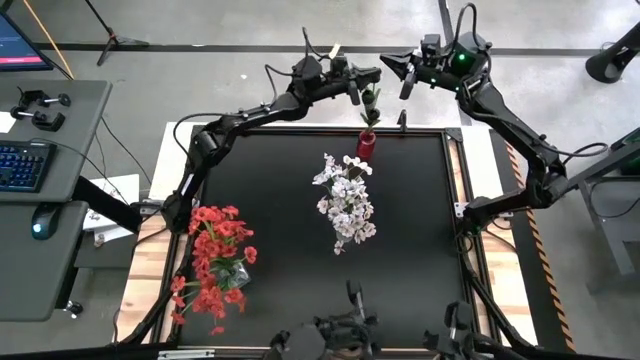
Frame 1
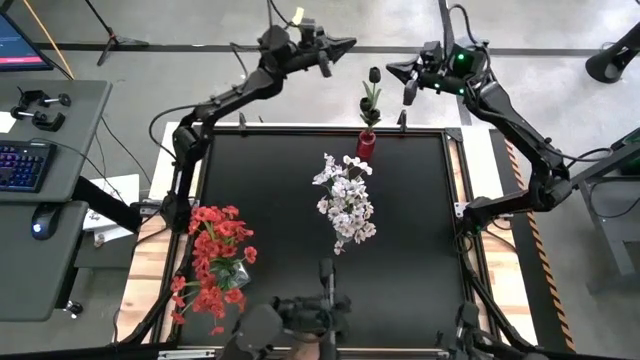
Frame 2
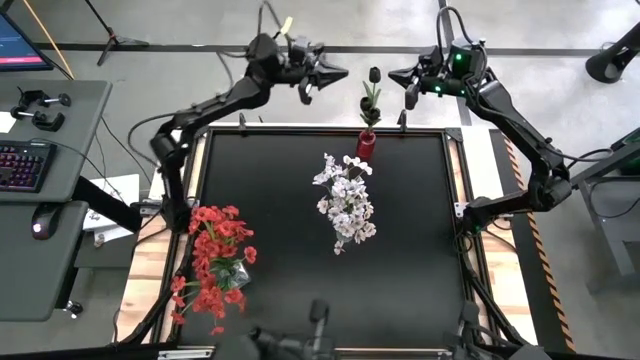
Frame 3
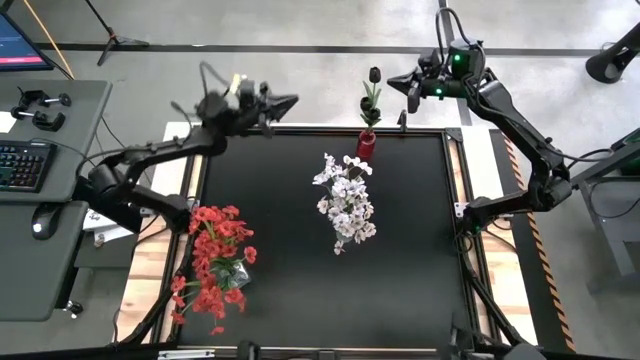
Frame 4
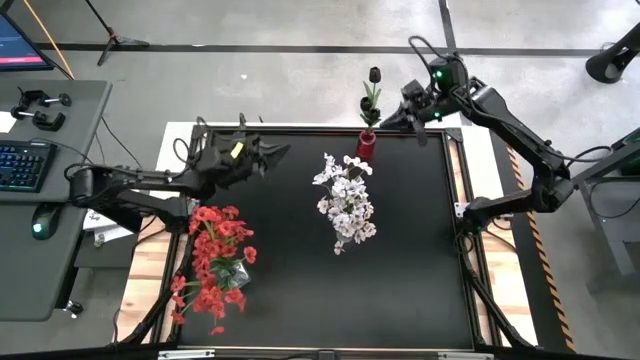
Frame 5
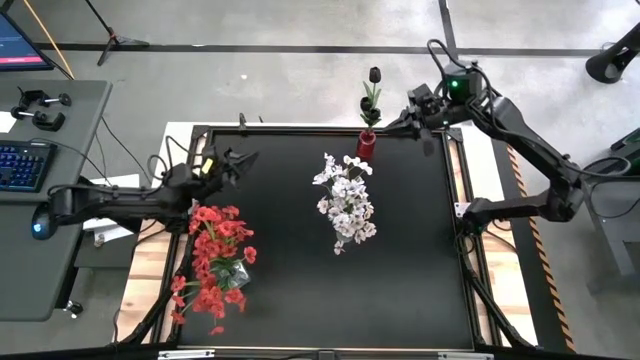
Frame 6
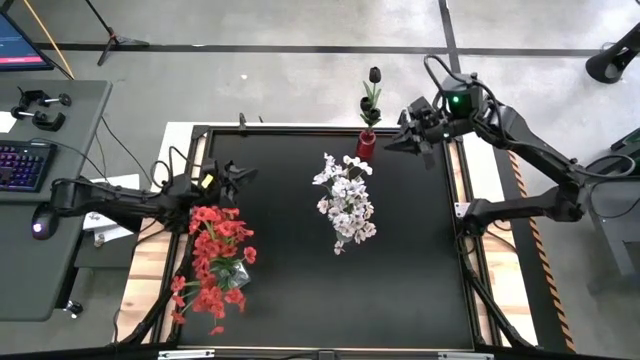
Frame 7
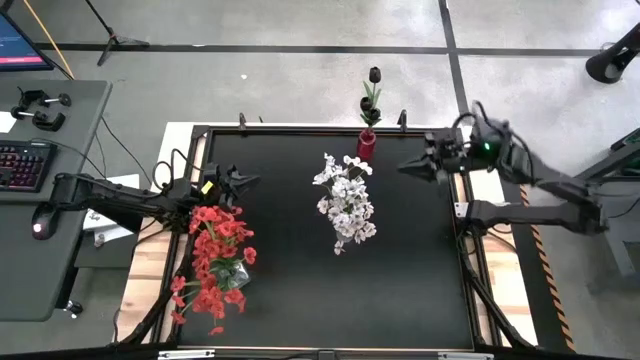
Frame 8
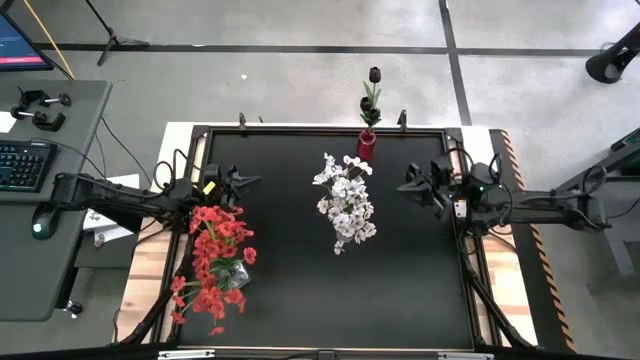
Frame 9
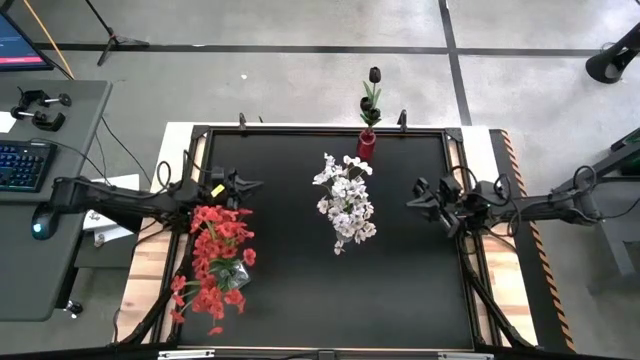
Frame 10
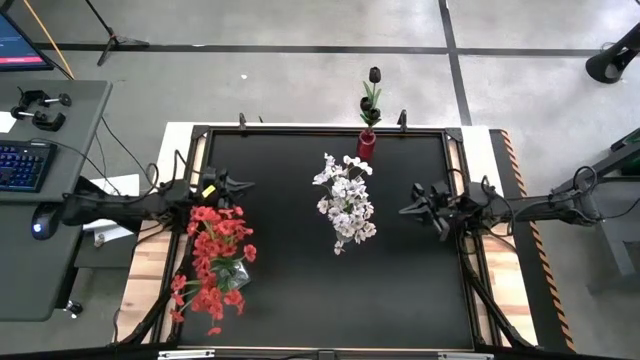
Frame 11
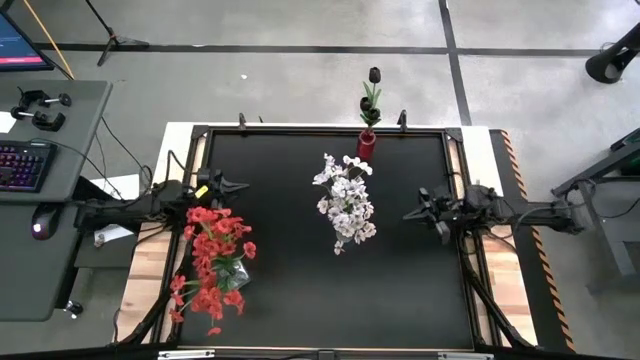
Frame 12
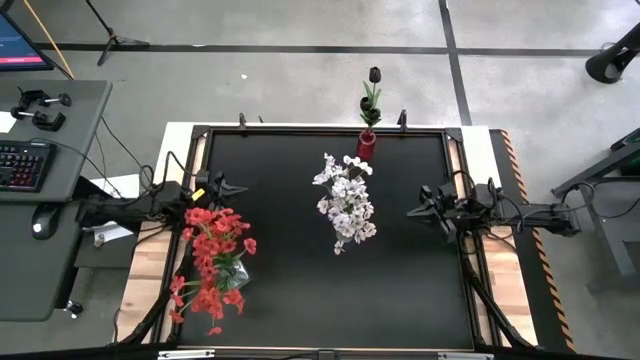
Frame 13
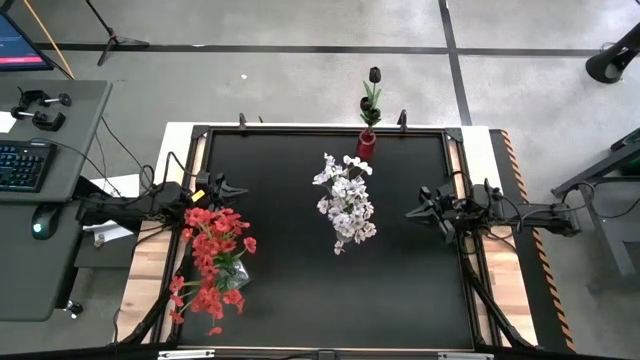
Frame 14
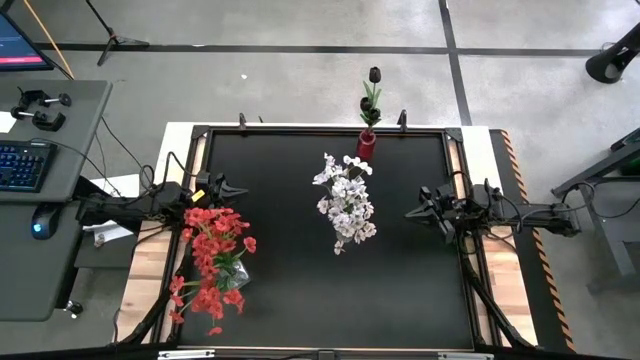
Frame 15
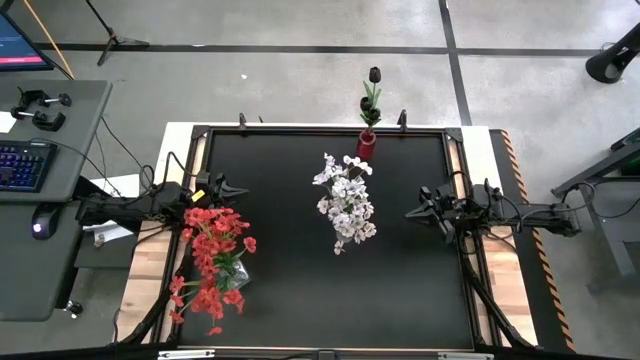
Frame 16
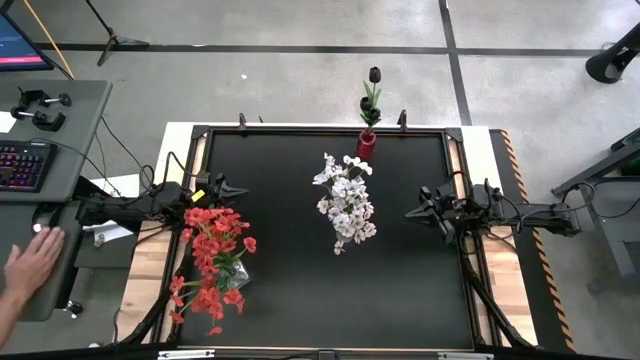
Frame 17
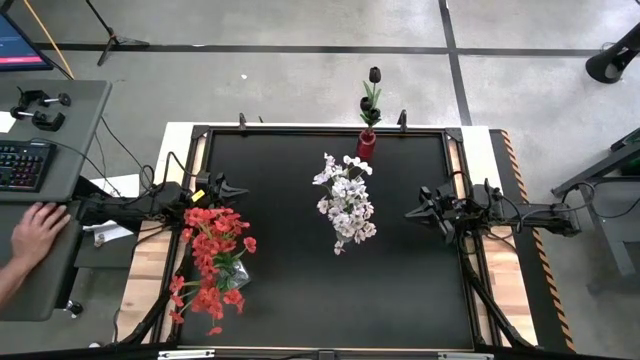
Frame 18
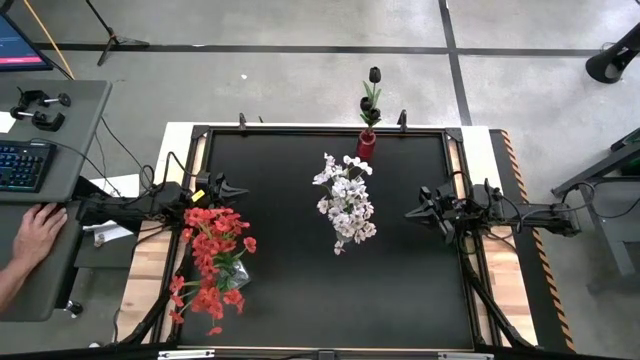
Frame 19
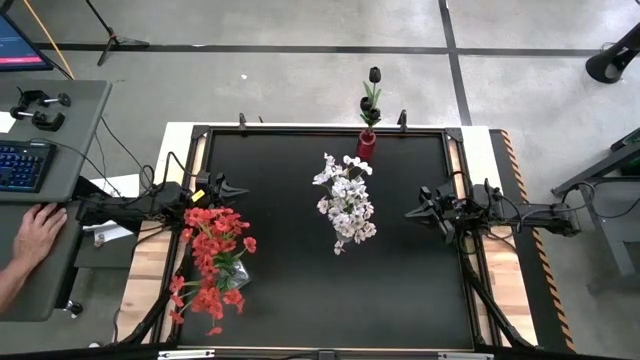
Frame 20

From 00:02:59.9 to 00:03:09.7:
Task: Sort flowers into vase by color
Return to Home Position

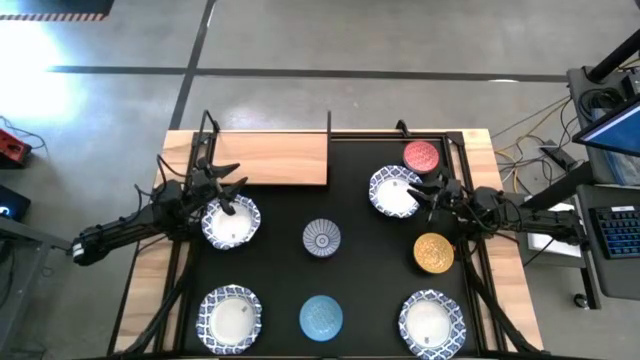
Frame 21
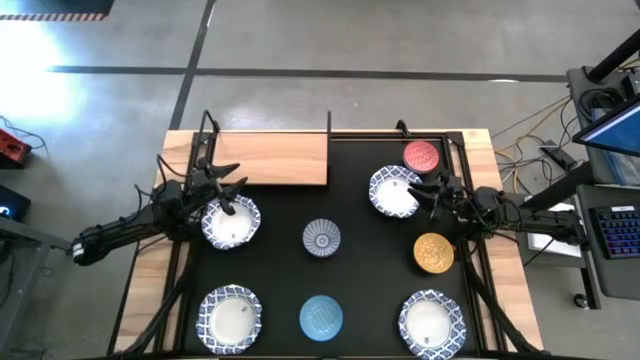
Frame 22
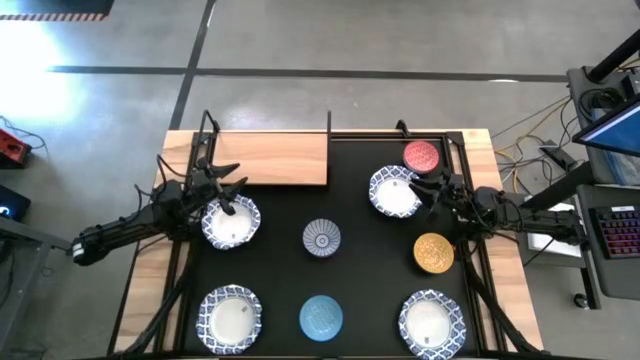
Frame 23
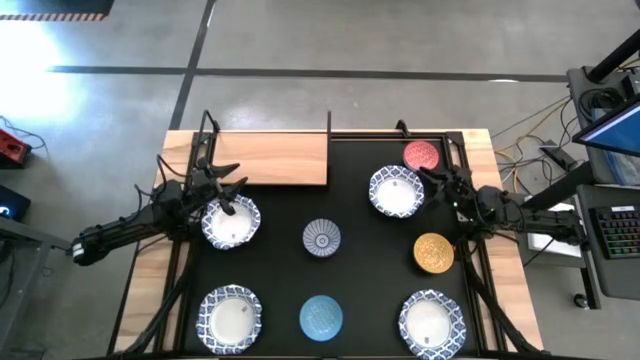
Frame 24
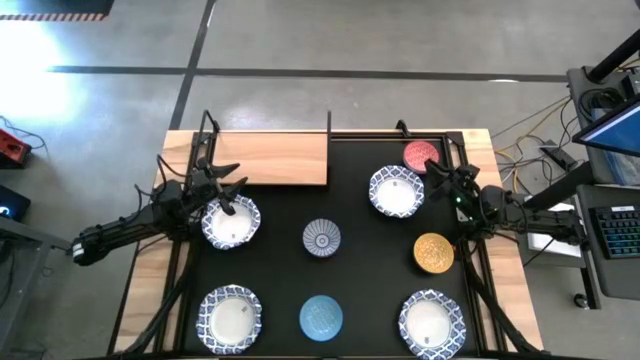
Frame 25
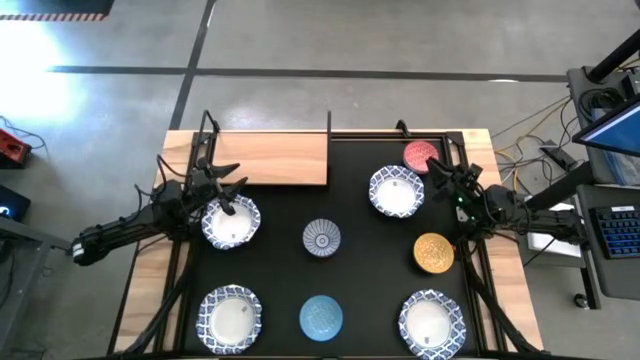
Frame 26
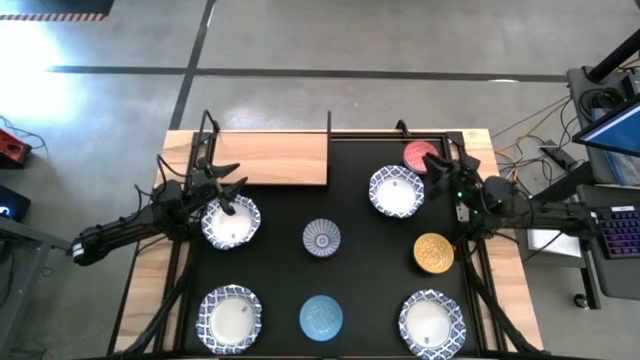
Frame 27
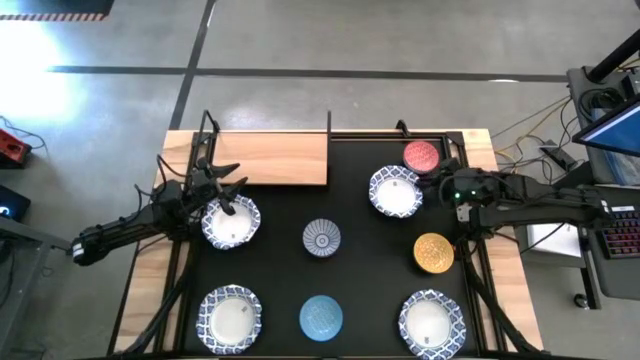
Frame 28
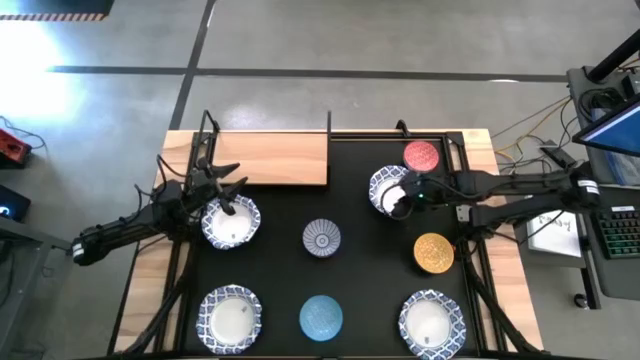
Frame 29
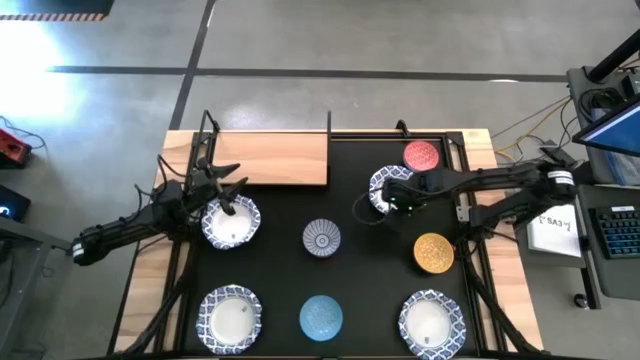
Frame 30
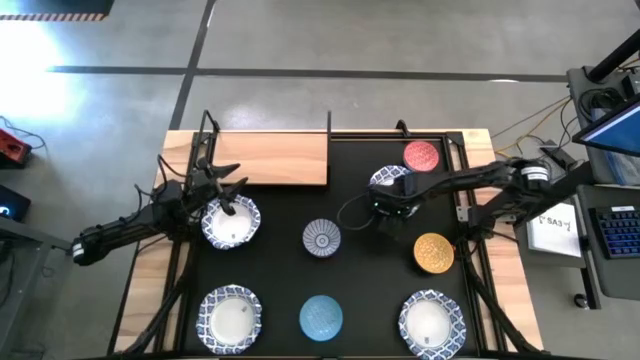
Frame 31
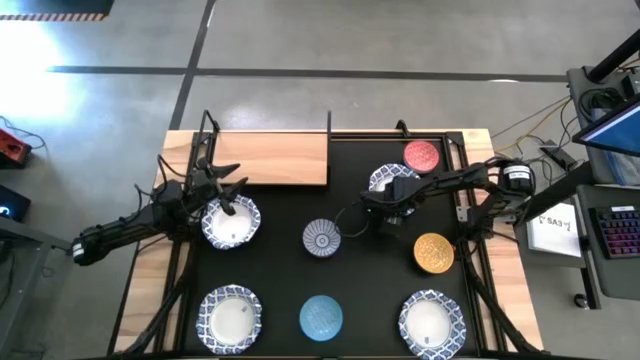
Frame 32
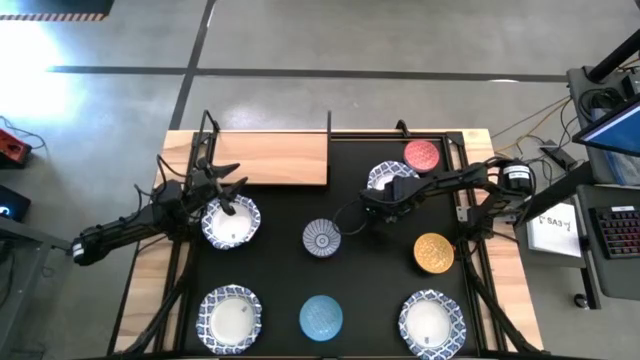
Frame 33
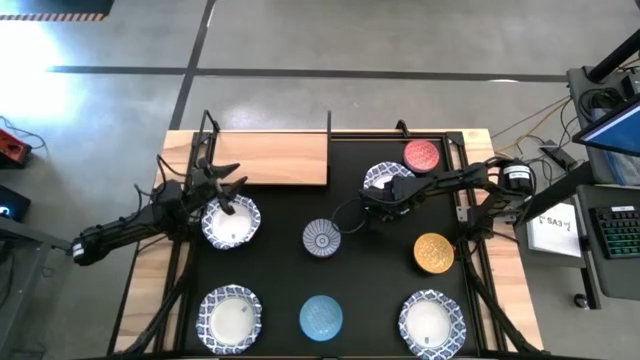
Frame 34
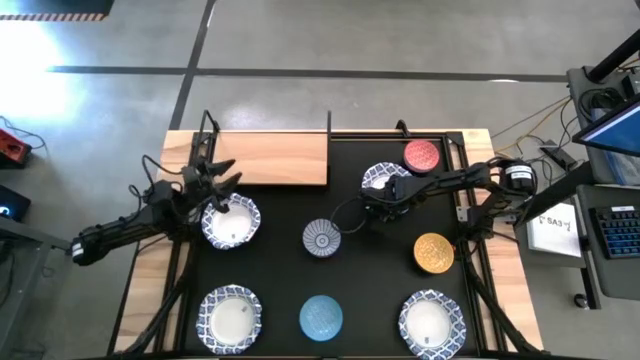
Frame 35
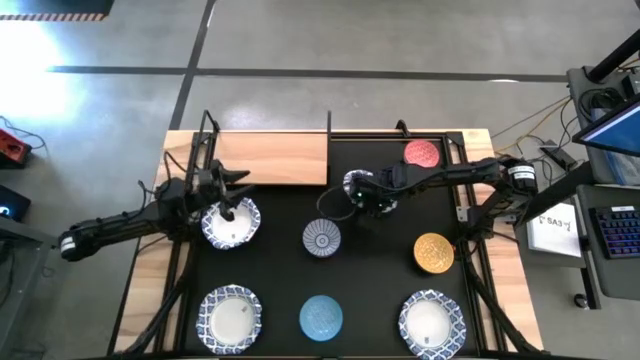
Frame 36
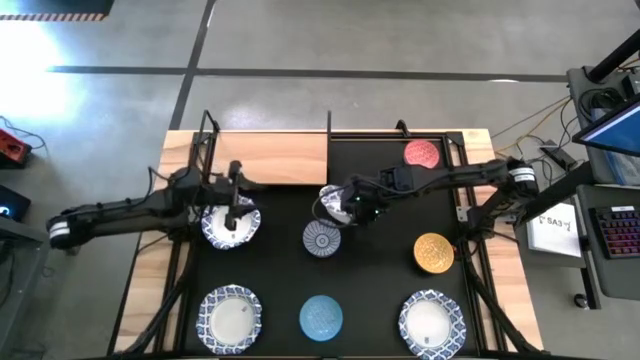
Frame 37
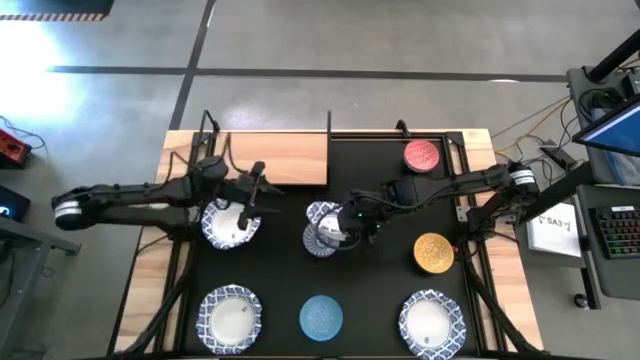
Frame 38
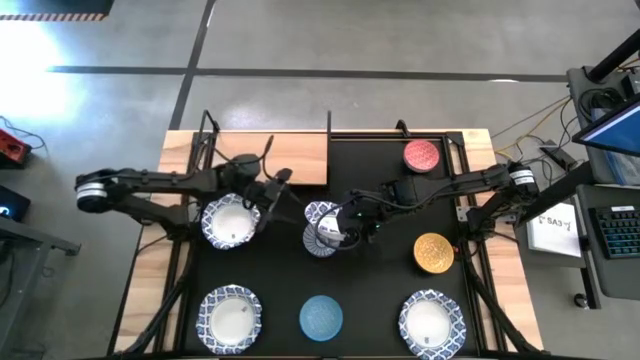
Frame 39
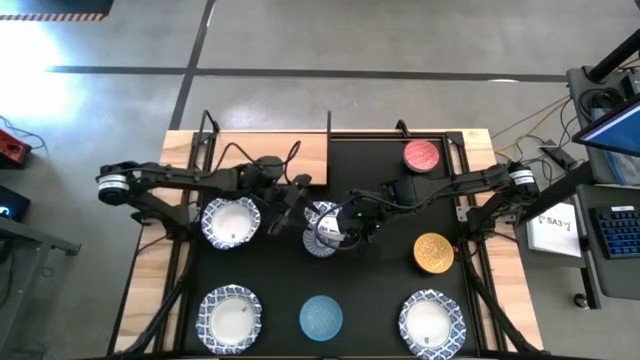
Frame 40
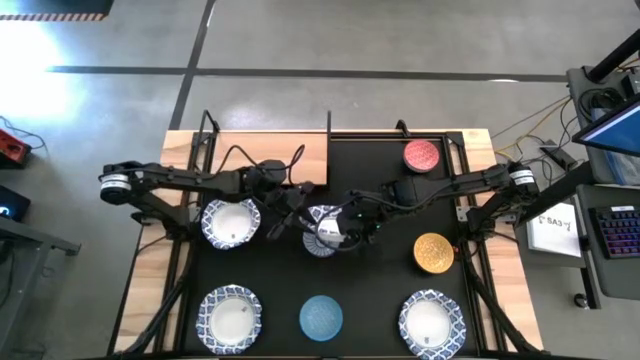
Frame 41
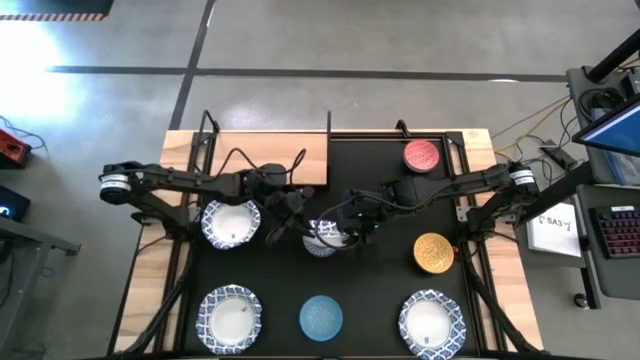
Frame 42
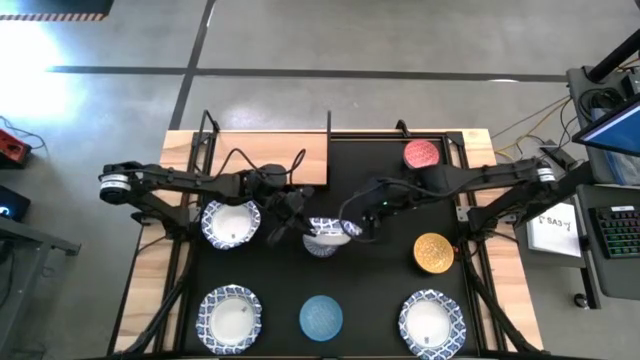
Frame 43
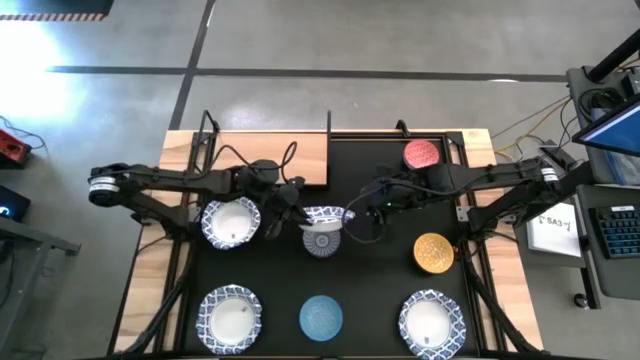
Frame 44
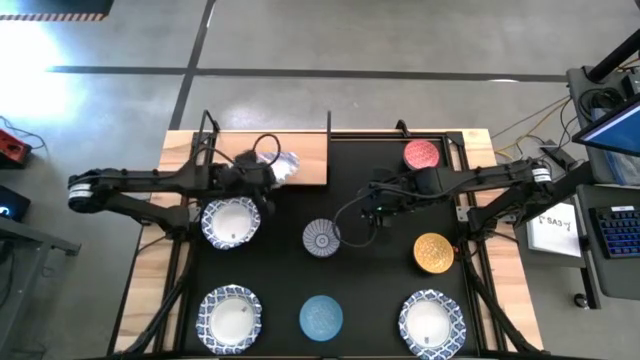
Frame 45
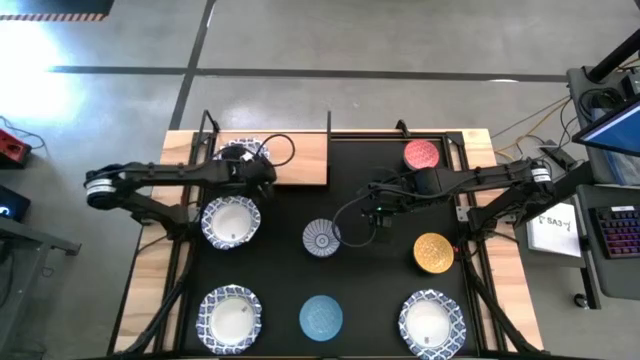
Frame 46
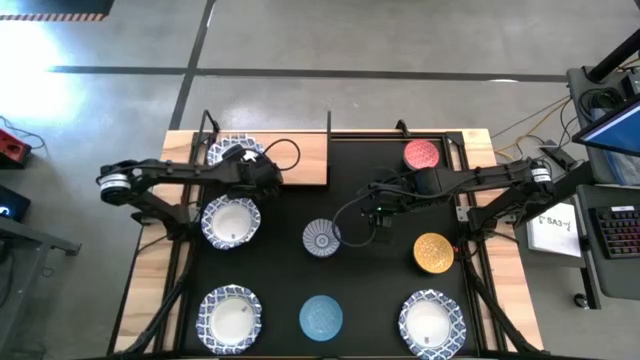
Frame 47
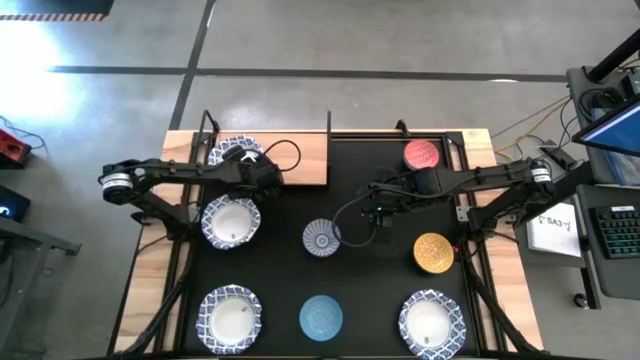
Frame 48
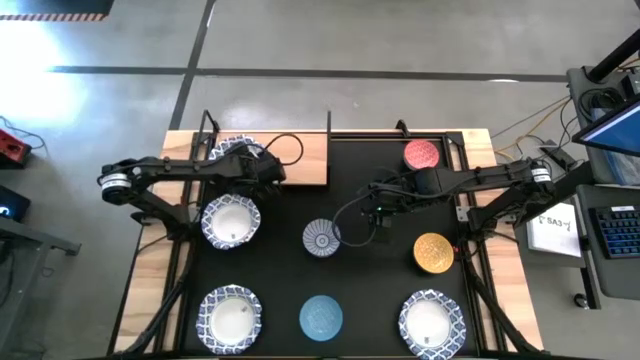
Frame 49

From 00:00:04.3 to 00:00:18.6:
Task: Place and stack bowls onto a shelf
Put the top right white patterned bowl on the shelf
